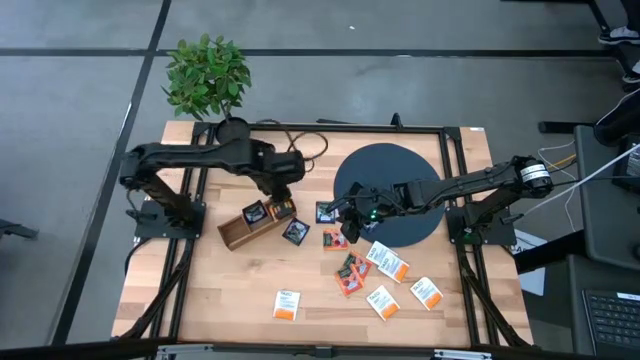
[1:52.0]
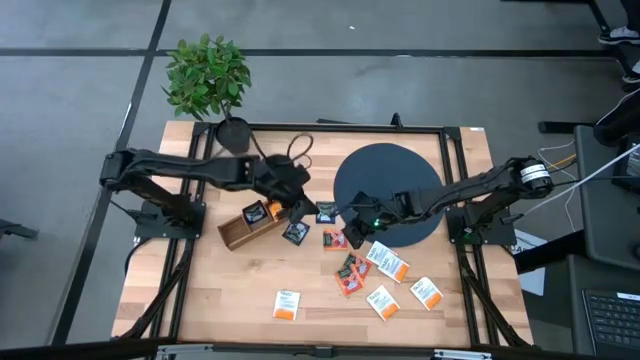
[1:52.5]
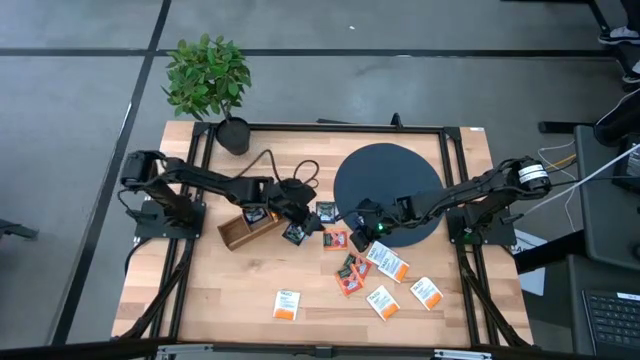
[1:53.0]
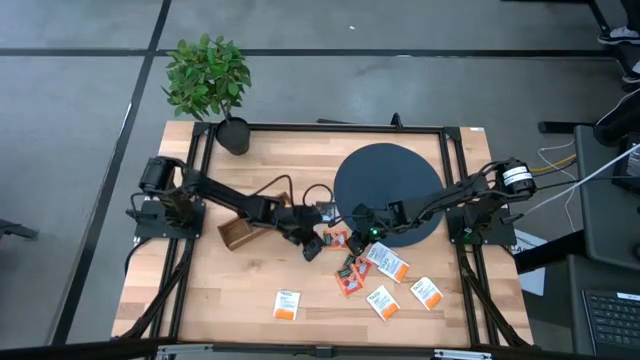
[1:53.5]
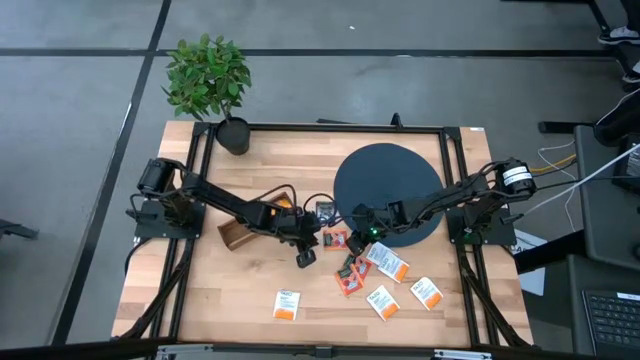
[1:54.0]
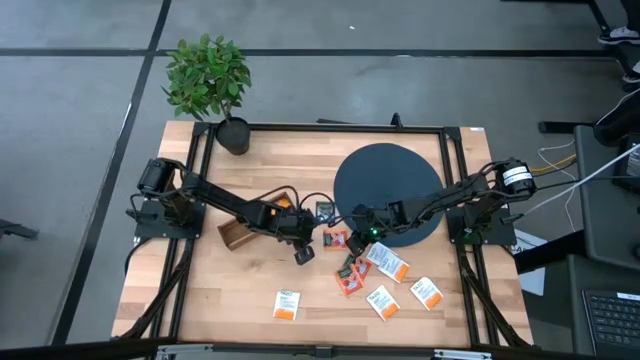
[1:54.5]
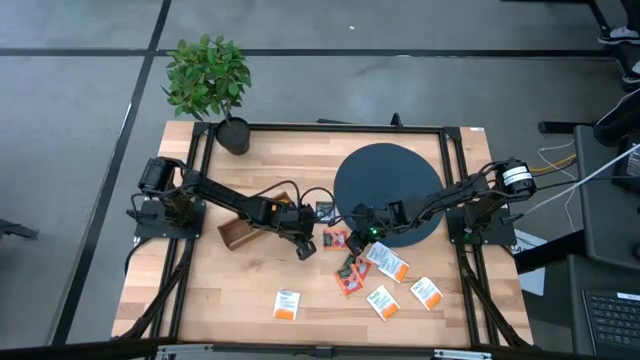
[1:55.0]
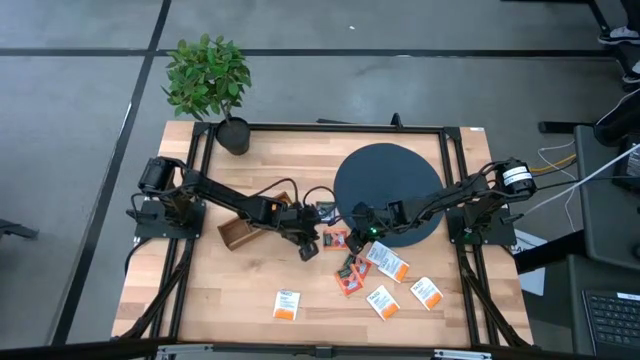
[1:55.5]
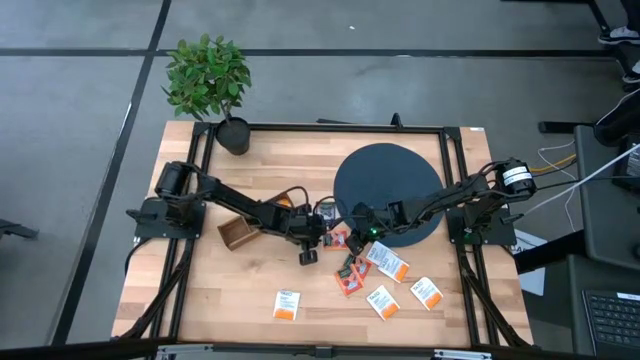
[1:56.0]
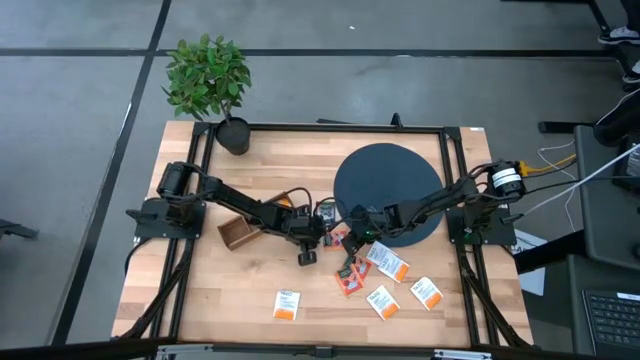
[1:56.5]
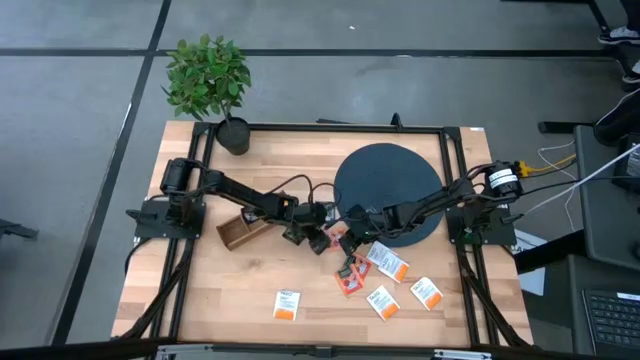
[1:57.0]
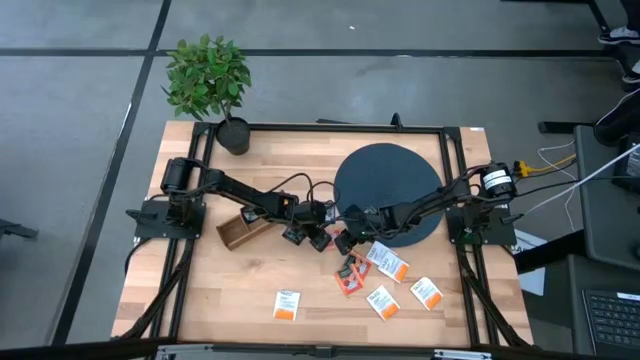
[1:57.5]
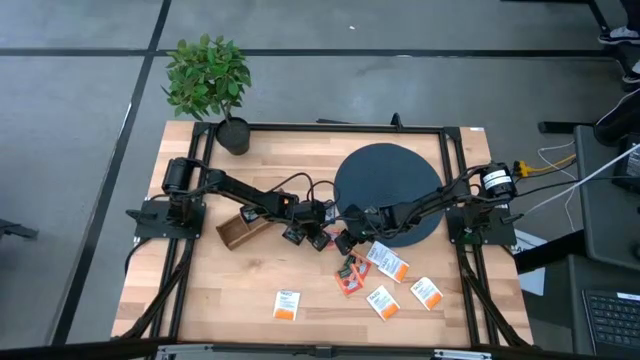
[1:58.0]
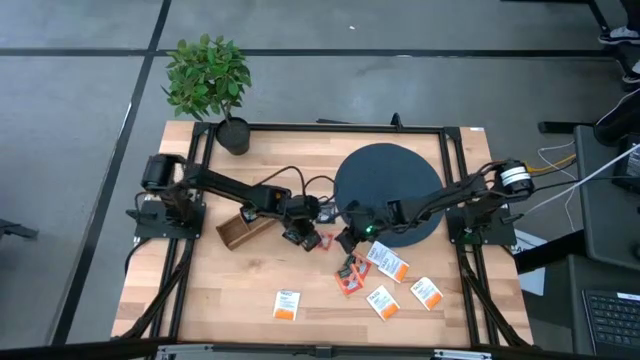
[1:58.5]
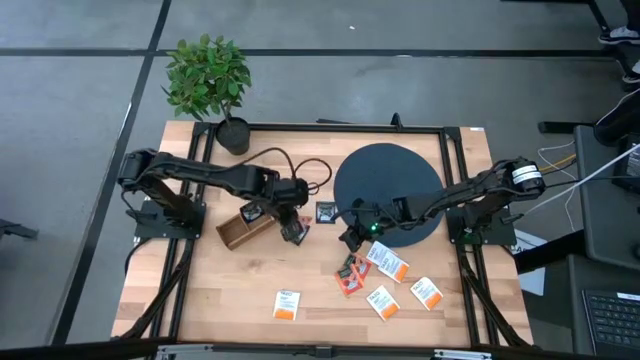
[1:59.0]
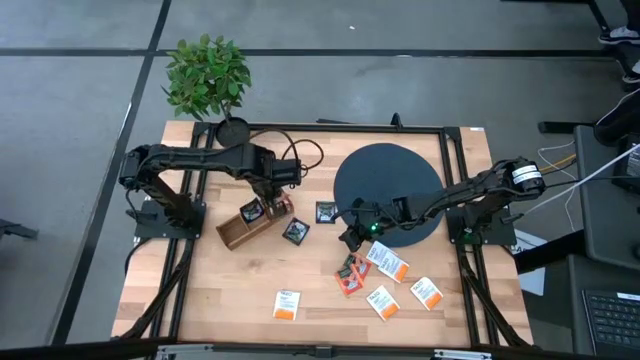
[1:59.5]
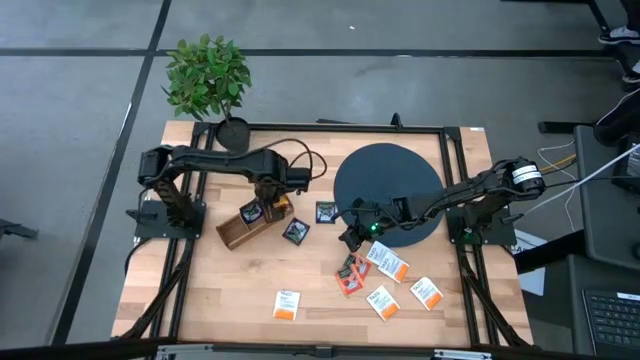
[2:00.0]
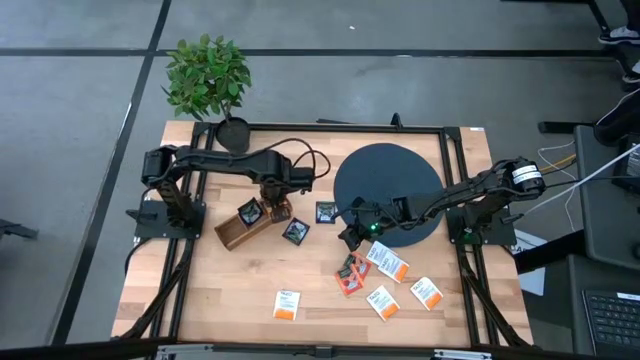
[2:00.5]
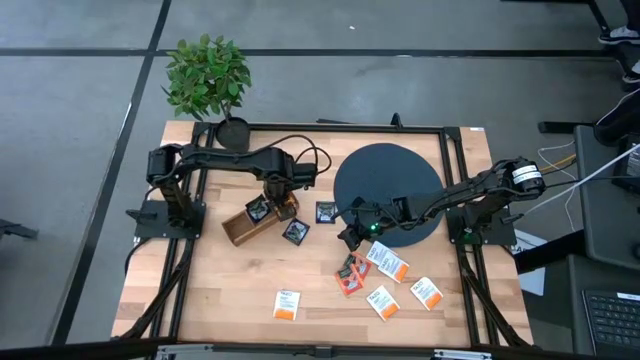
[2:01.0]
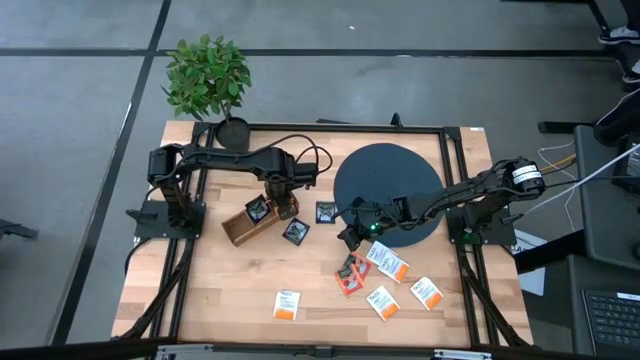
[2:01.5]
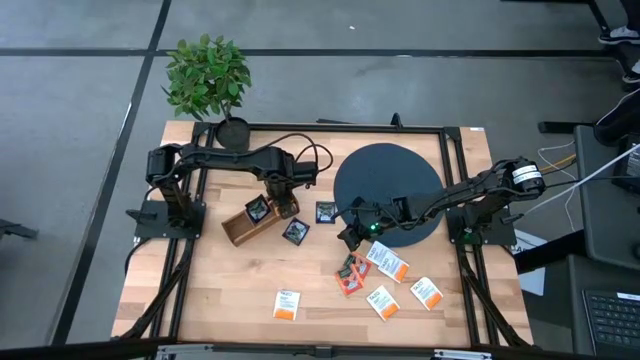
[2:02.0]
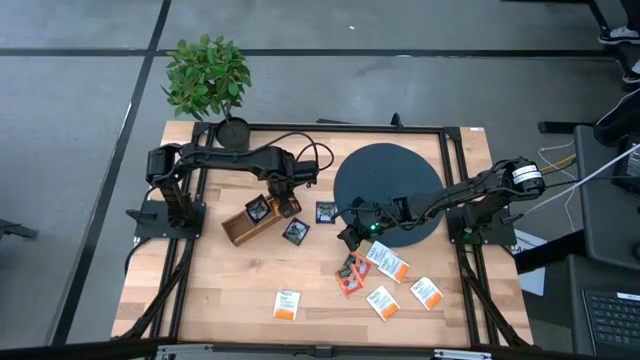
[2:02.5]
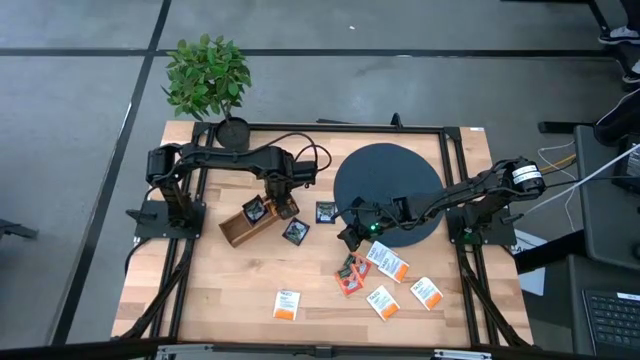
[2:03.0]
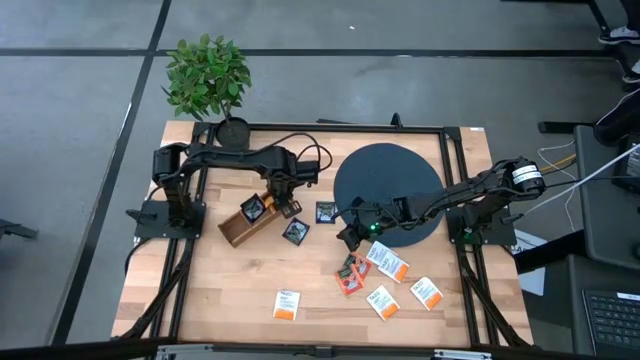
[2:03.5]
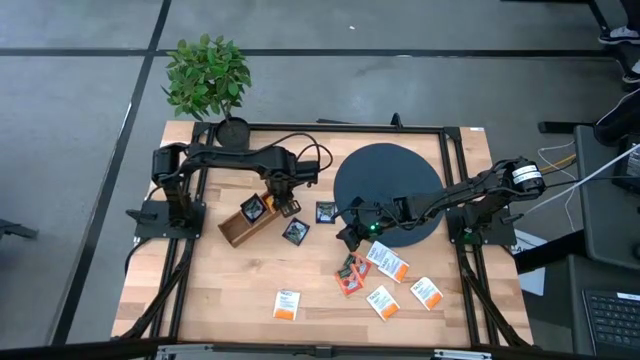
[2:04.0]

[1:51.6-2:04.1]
Task: Pick & Place Tea
Put the orange tea bag into the right section of the wooden organizer

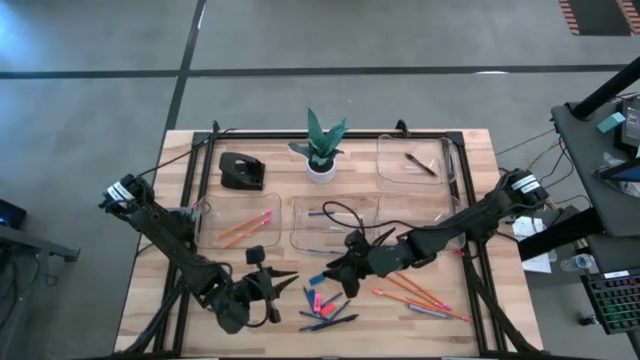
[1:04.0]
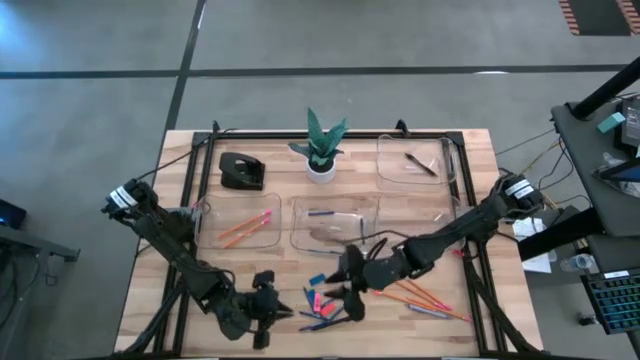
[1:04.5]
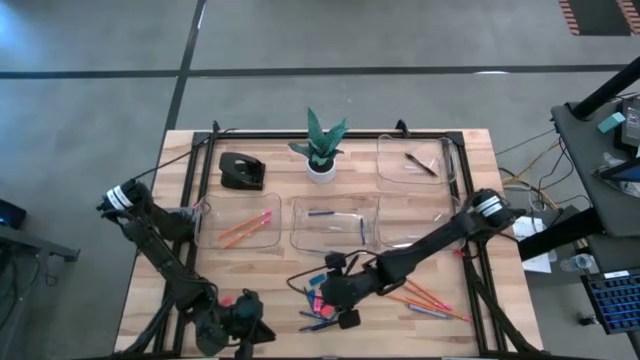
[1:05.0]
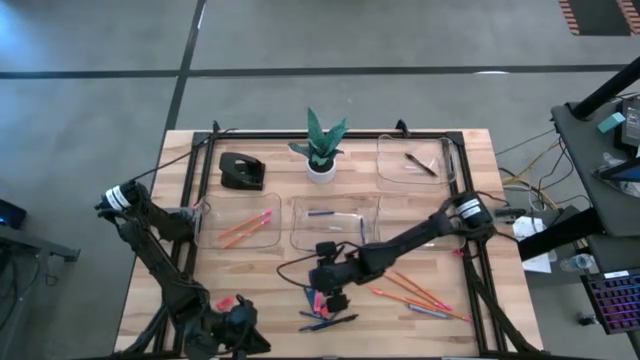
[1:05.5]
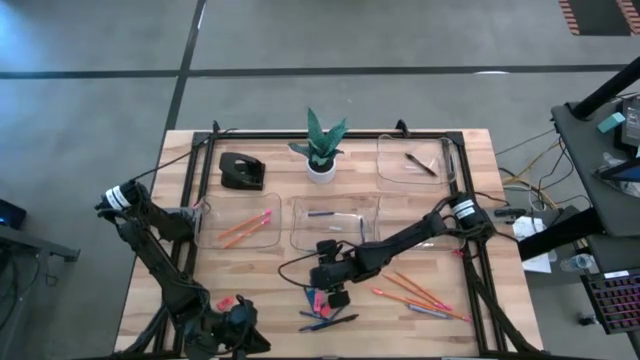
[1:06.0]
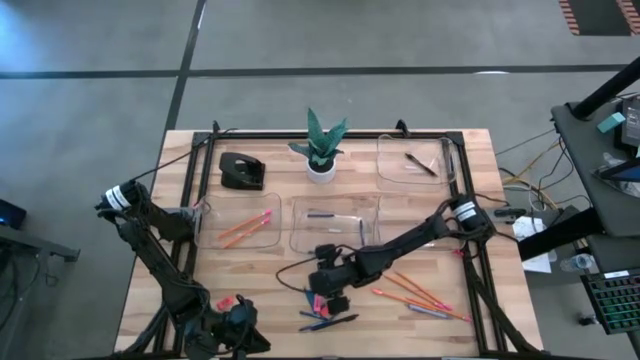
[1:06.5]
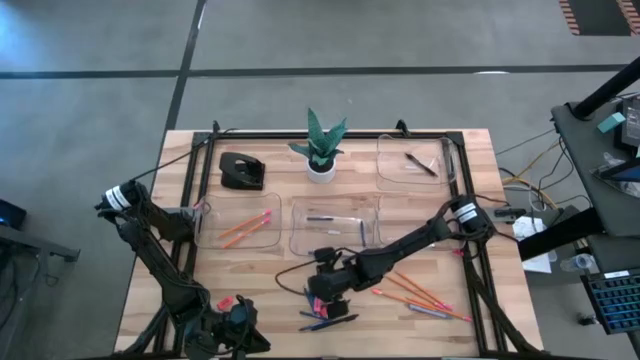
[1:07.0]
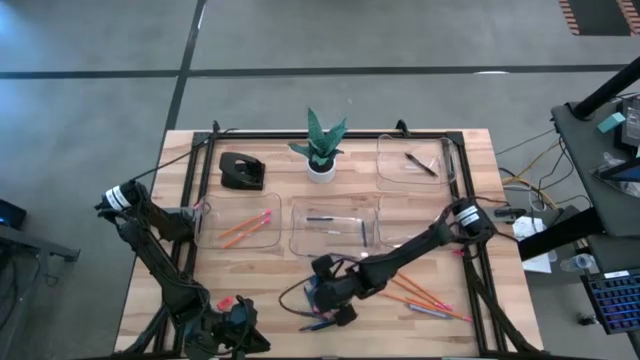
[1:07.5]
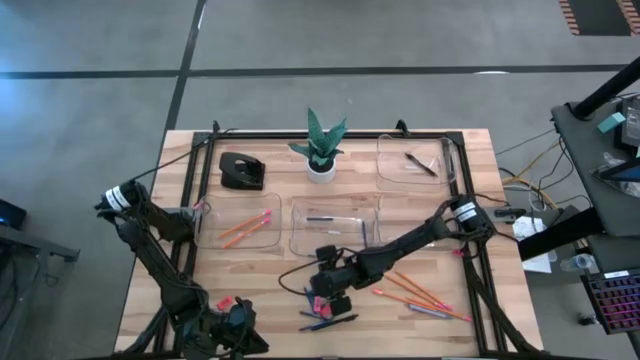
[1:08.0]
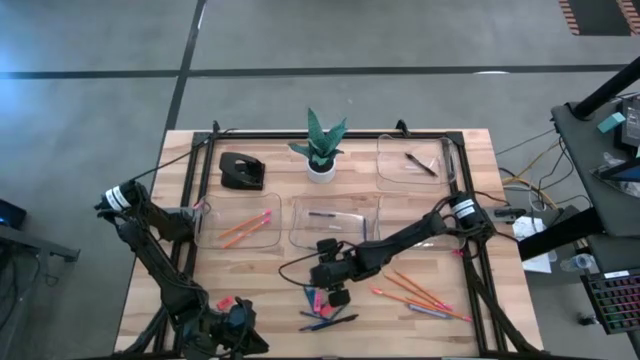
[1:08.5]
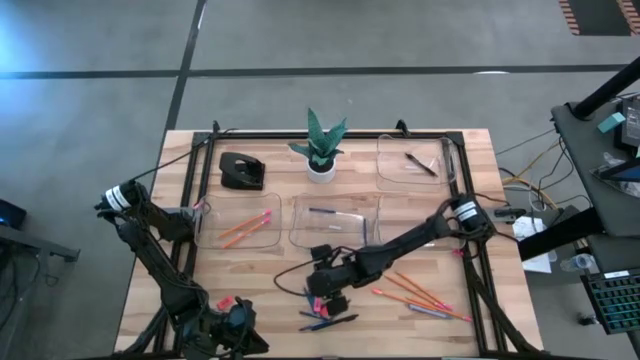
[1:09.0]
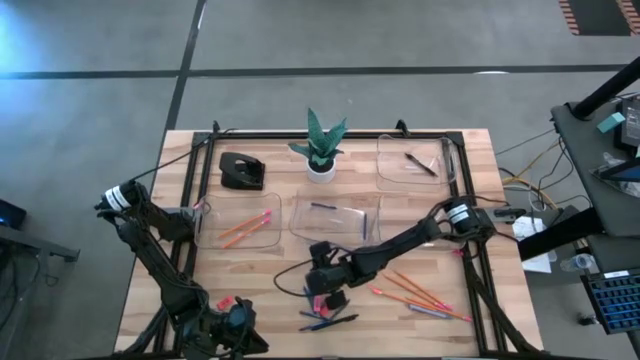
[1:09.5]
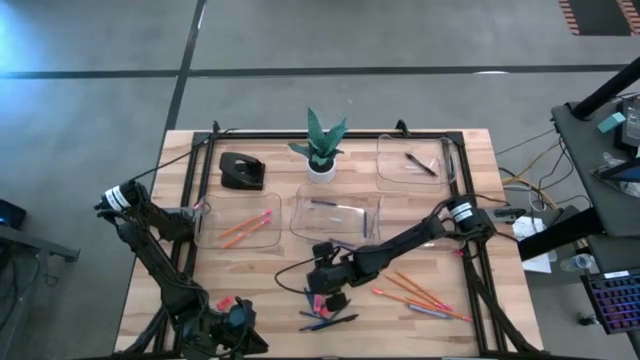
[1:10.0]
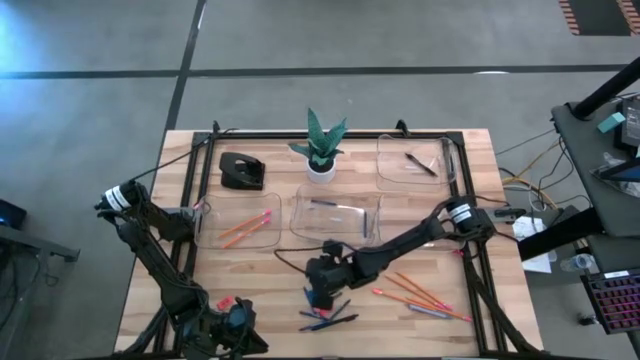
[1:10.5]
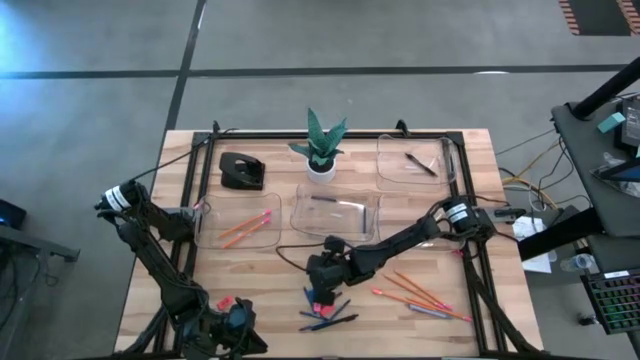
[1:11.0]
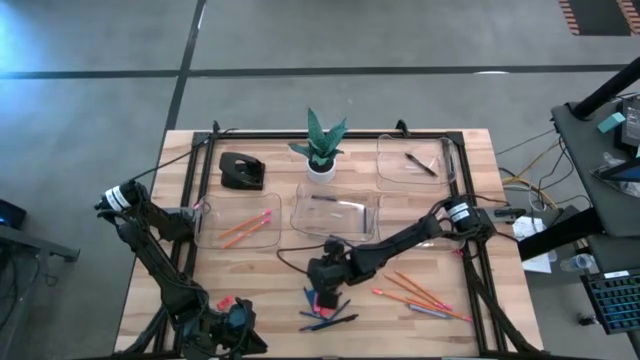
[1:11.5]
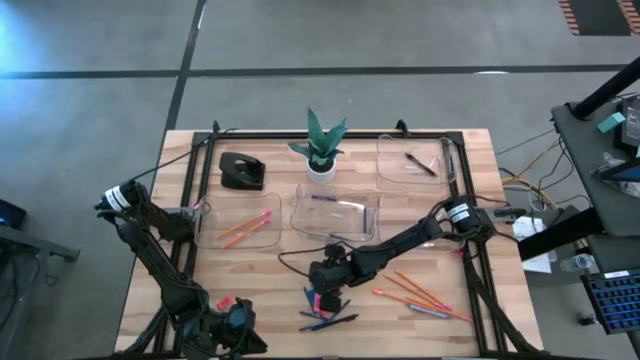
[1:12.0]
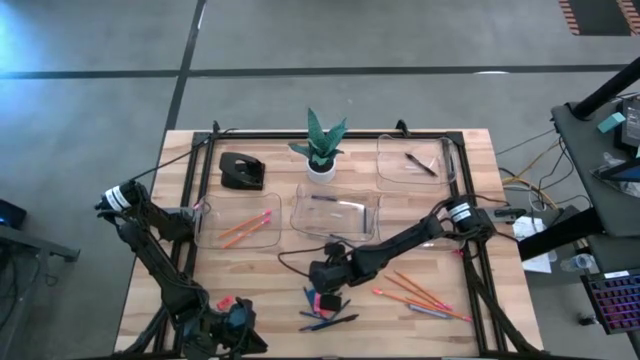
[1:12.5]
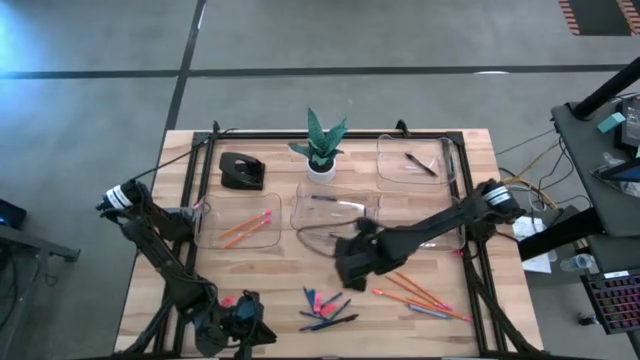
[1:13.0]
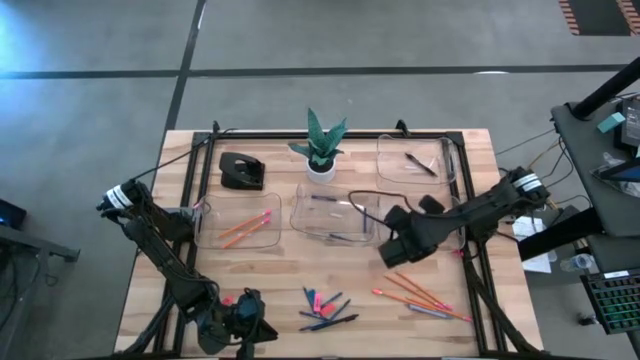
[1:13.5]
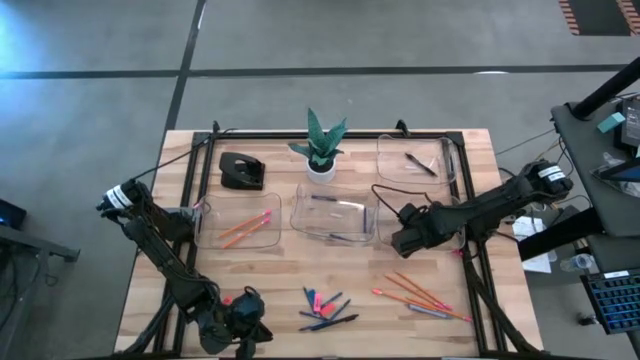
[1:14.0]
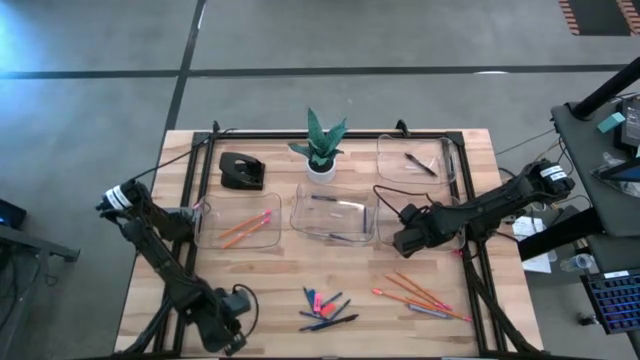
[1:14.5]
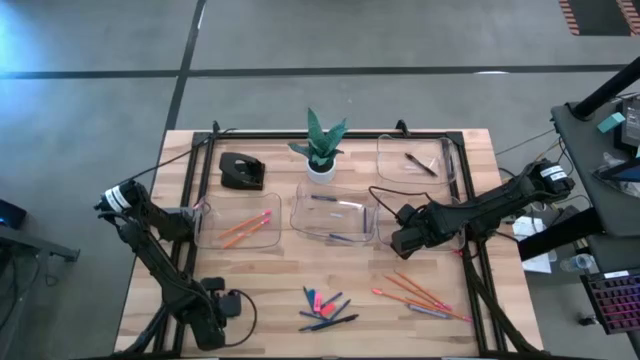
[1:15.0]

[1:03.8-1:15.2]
Task: Sort crayons/erasers/pens/pencils in bins
Put the blue eraser into the middle right transparent bin
